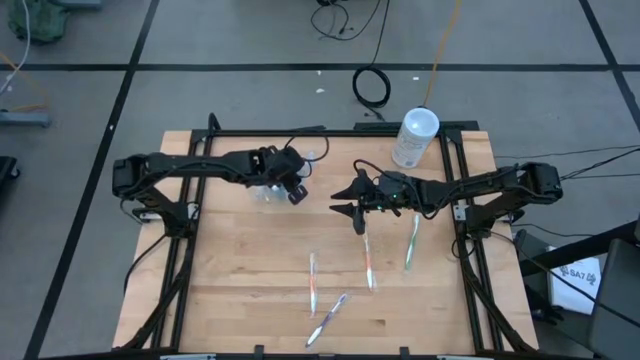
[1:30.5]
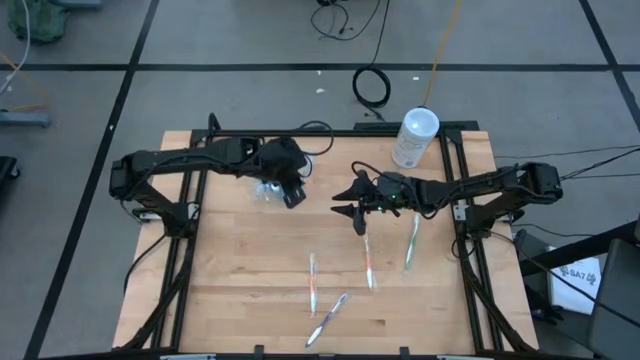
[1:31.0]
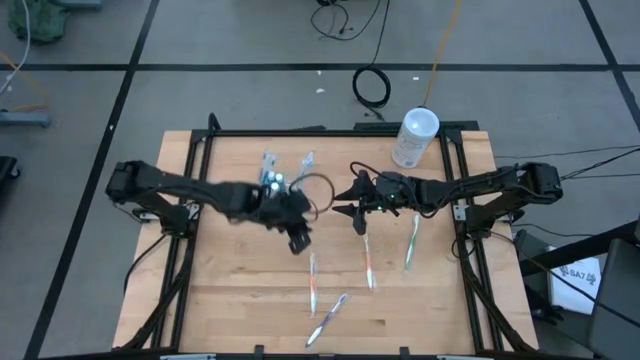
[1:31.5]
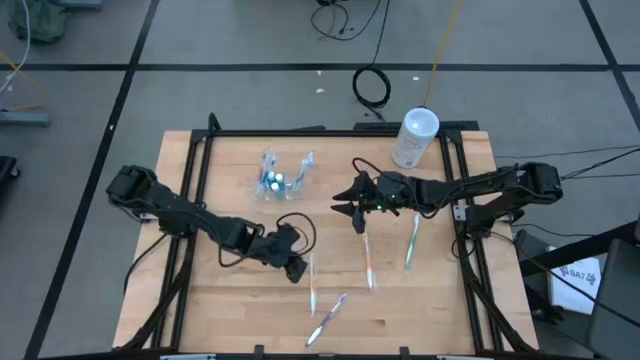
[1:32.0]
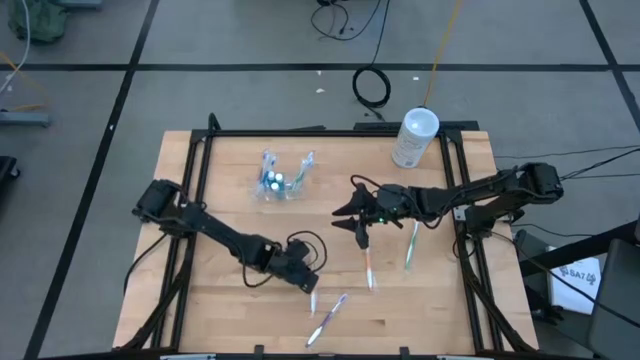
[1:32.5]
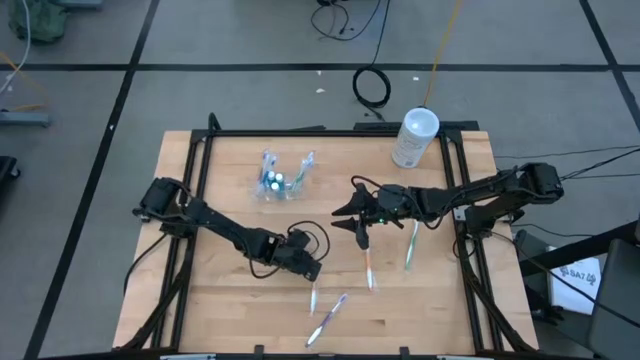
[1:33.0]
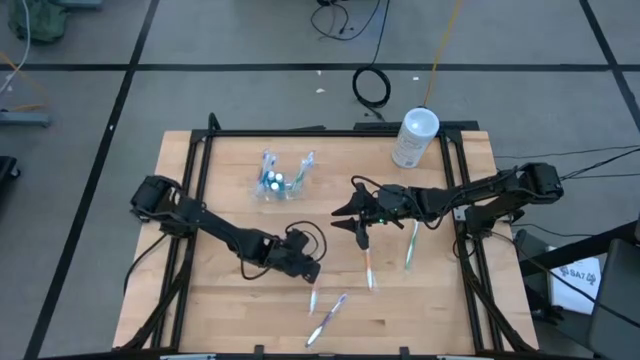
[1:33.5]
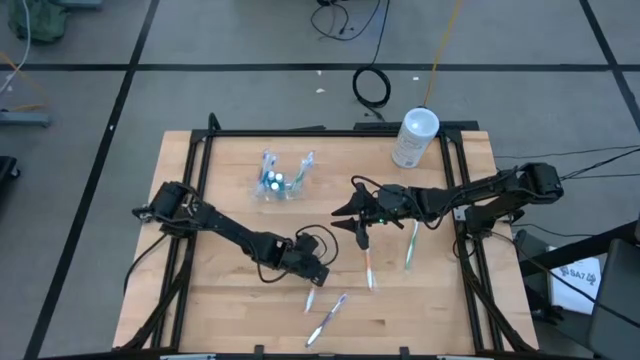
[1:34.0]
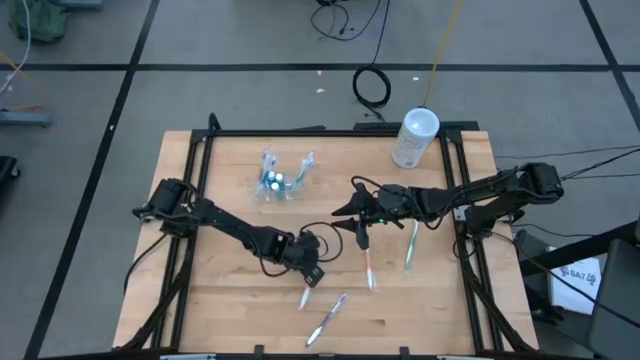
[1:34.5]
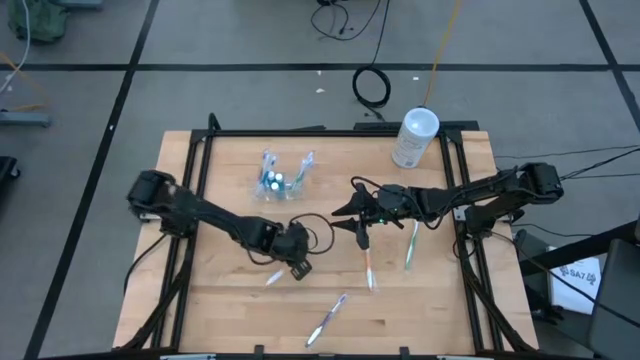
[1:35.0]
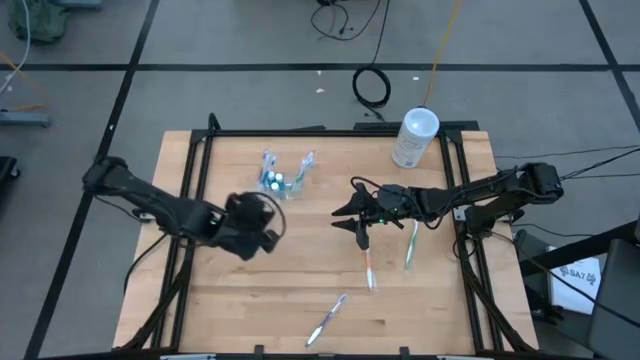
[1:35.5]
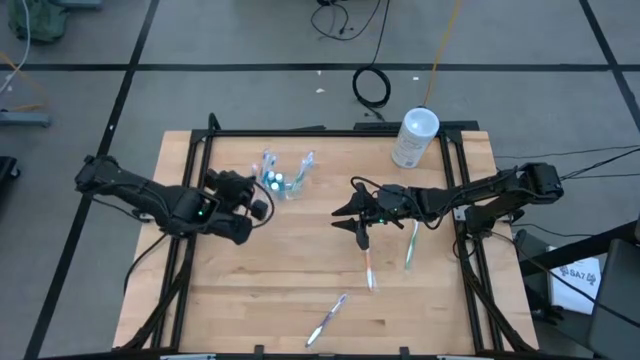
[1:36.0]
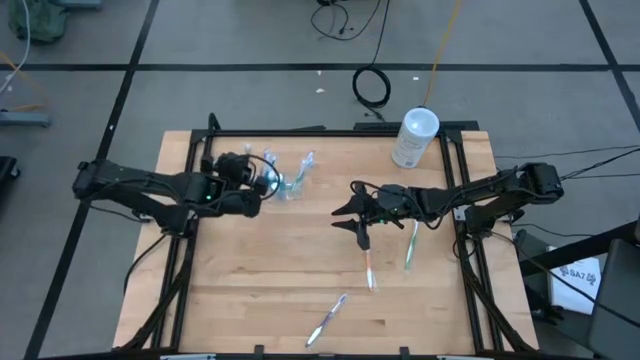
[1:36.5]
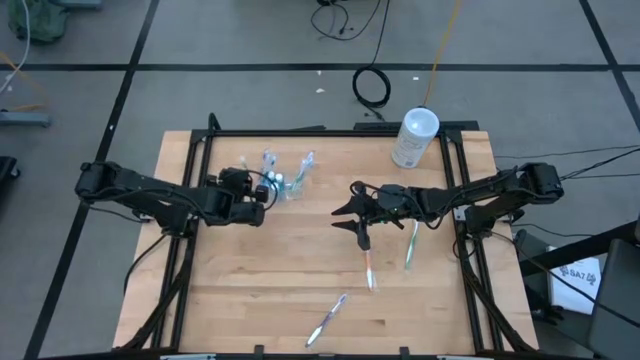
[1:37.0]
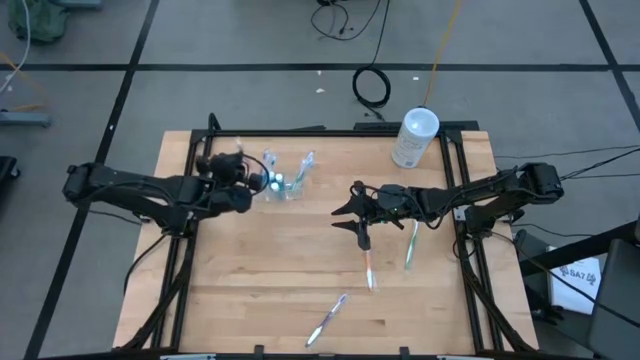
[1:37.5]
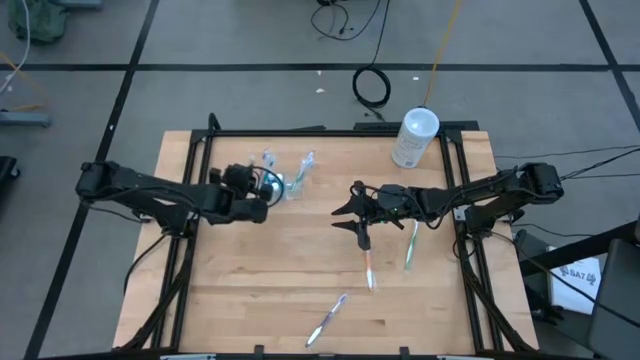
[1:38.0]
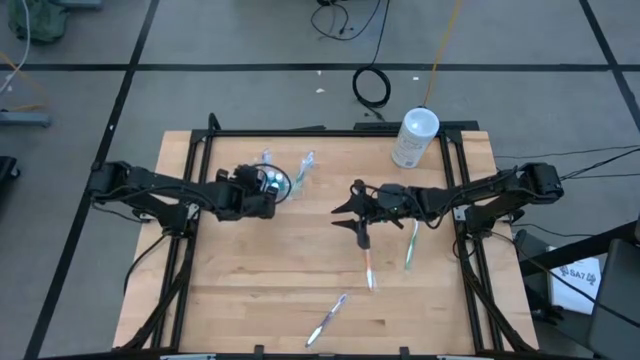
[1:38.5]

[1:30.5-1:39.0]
Task: Pick & Place toothbrushing station
Put the left orange toothbrush into the left compartment of the transparent organizer

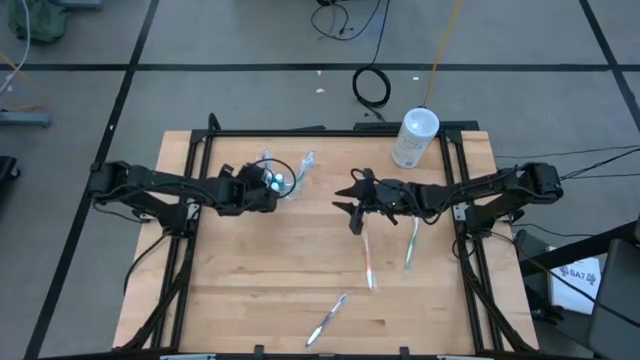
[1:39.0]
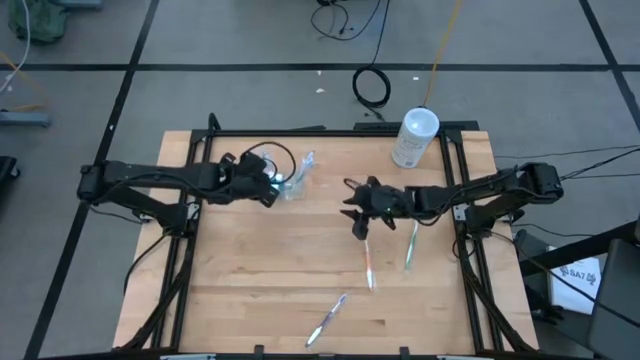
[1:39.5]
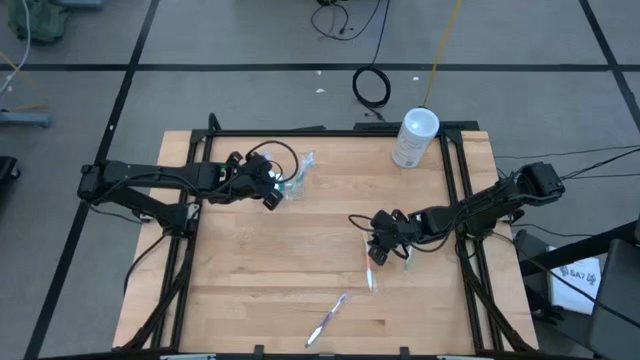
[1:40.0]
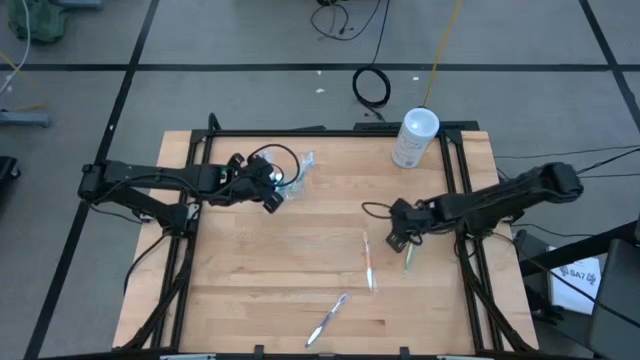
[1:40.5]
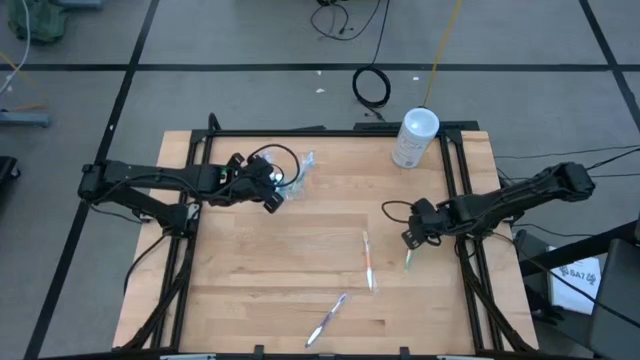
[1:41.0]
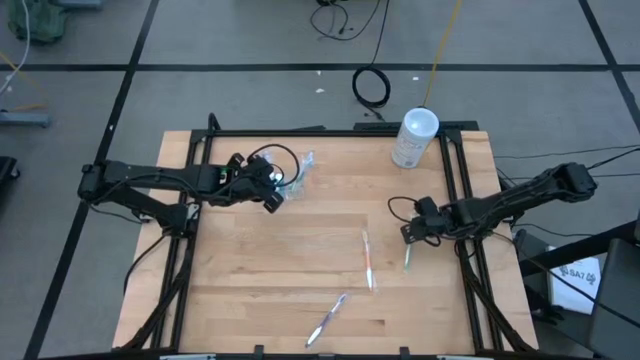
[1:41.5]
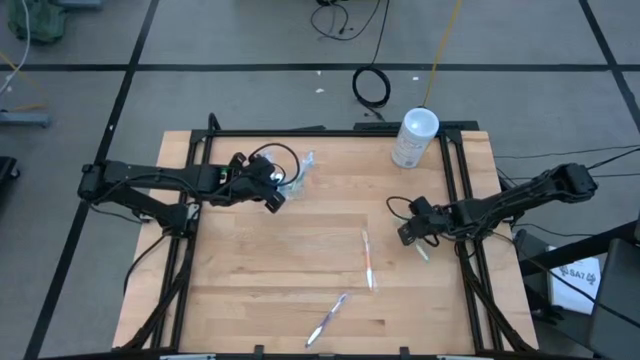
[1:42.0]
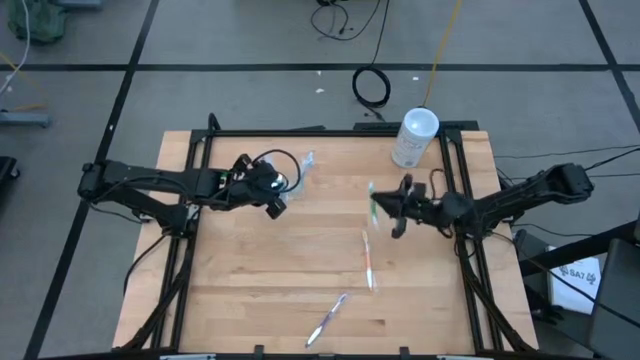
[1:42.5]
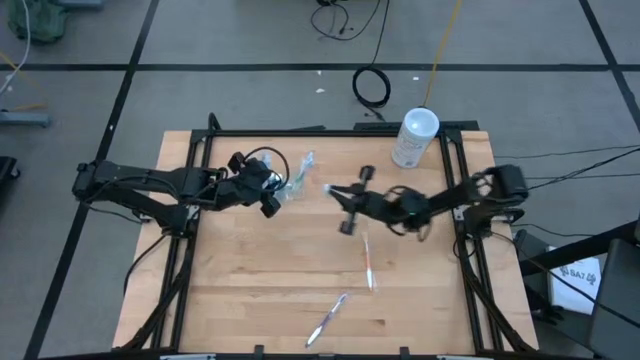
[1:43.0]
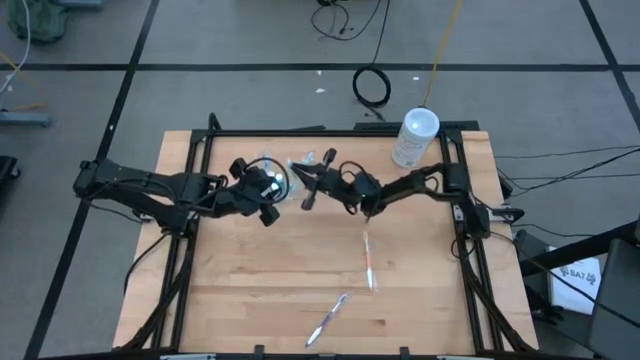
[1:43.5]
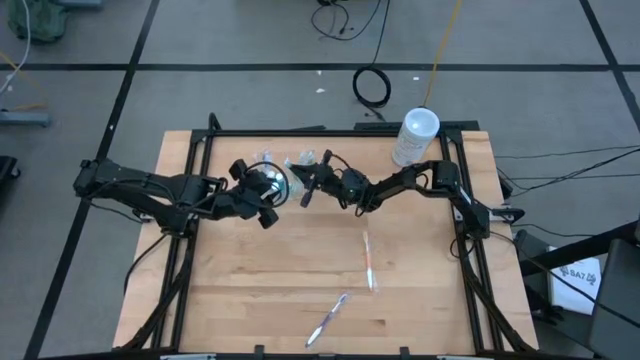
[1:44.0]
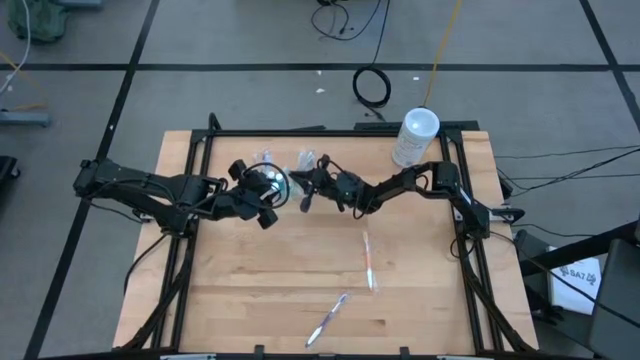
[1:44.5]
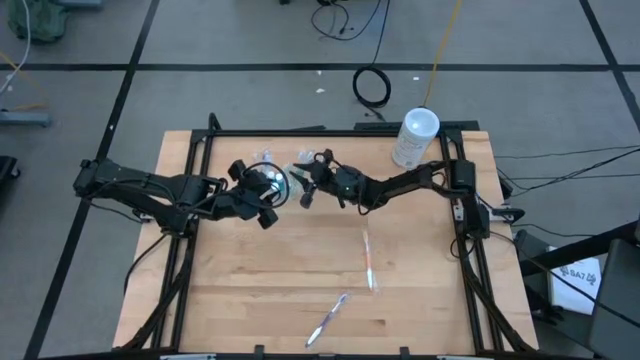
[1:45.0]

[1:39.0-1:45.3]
Put the green toothbrush into the right compartment of the transparent organizer

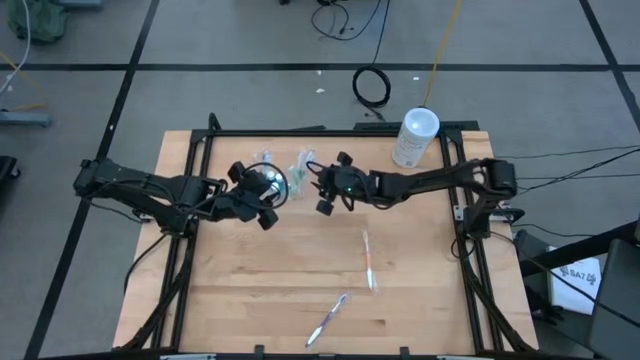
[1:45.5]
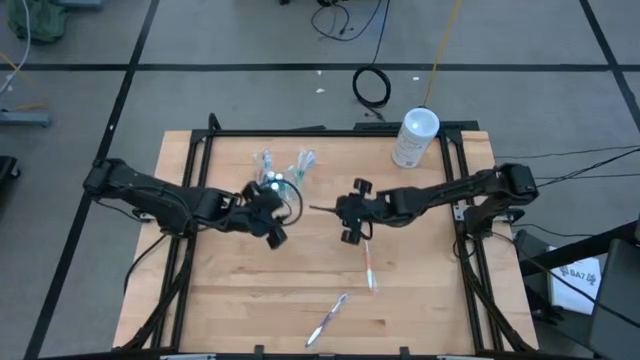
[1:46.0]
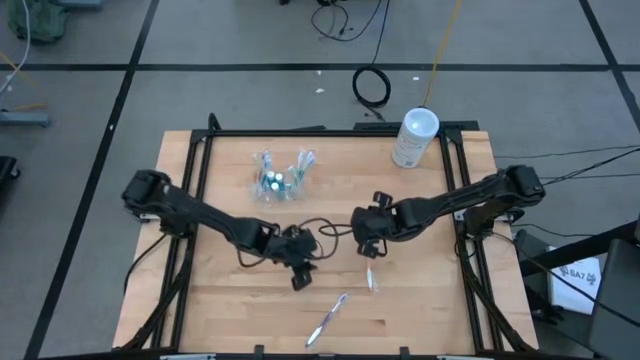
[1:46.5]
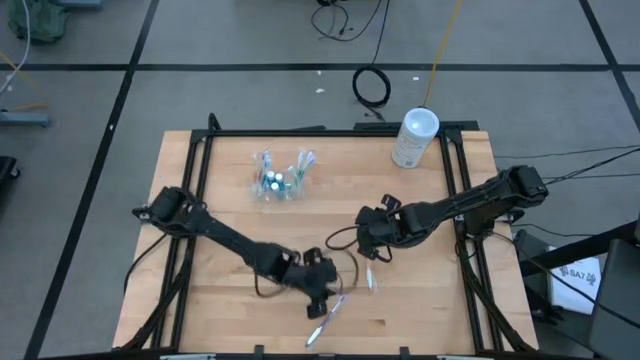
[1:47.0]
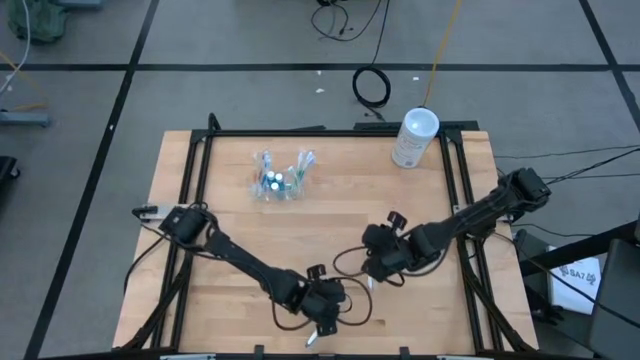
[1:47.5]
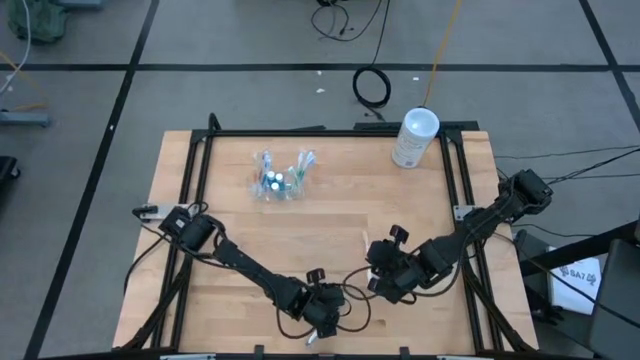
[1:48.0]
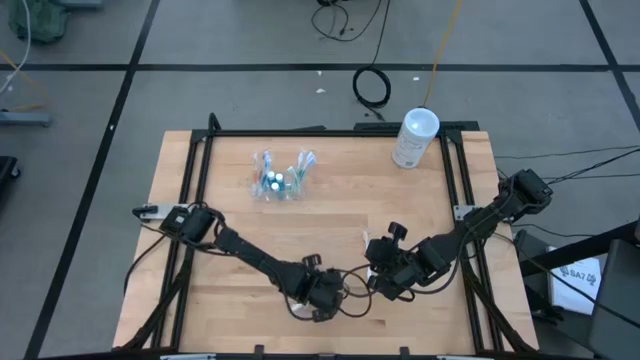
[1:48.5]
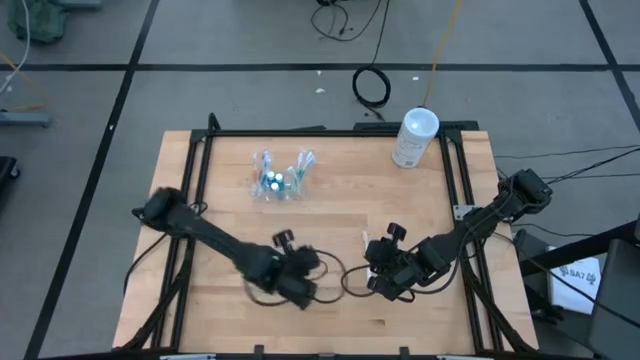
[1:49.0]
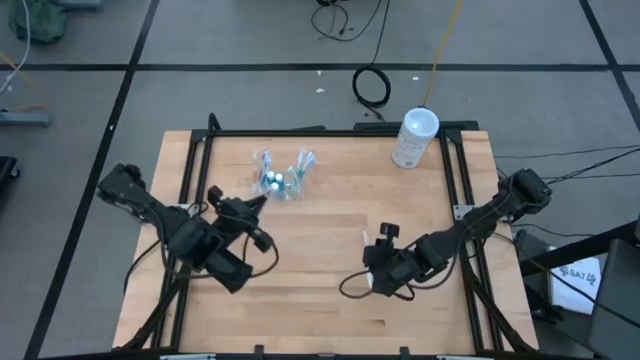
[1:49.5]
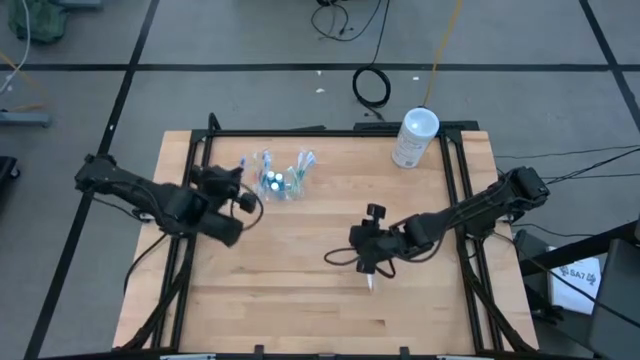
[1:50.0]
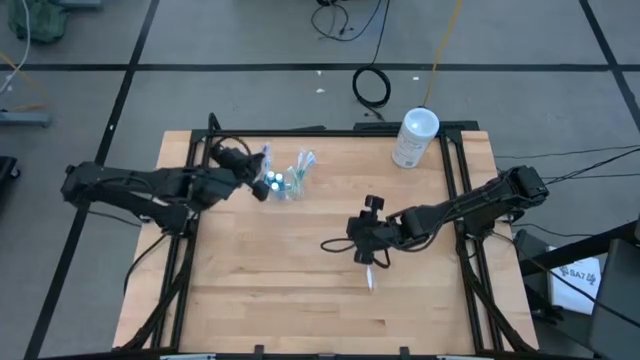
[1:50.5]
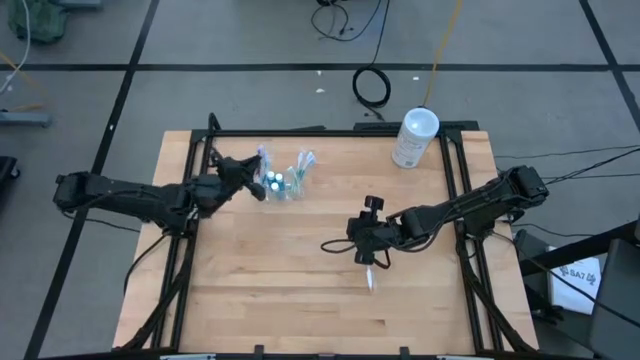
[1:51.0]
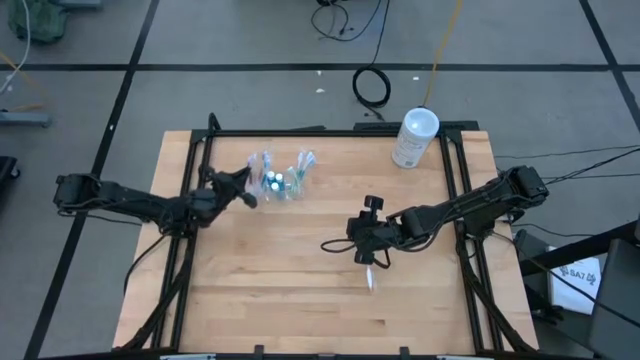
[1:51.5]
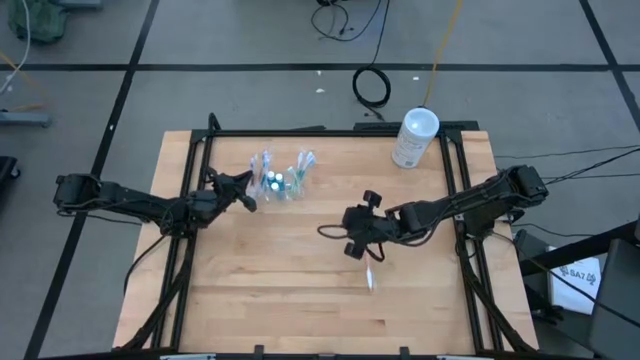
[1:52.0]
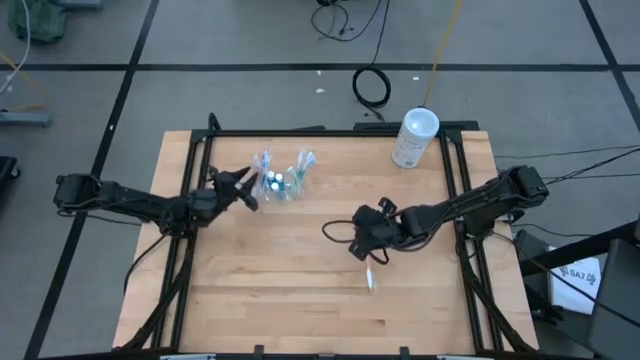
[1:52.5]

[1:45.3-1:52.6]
Put the purple toothbrush into the left compartment of the transparent organizer
